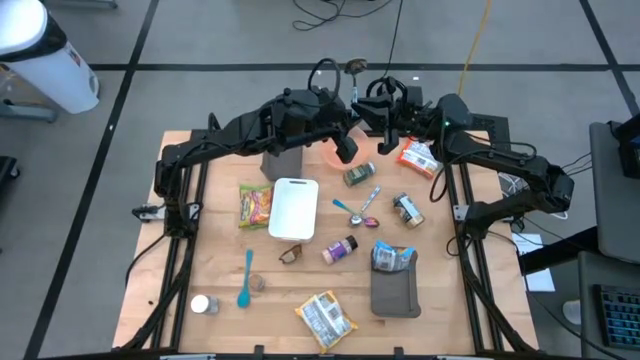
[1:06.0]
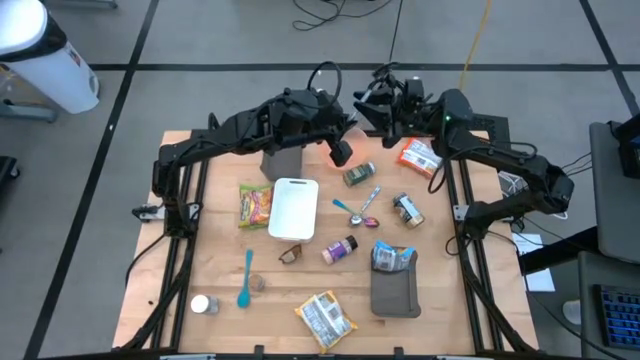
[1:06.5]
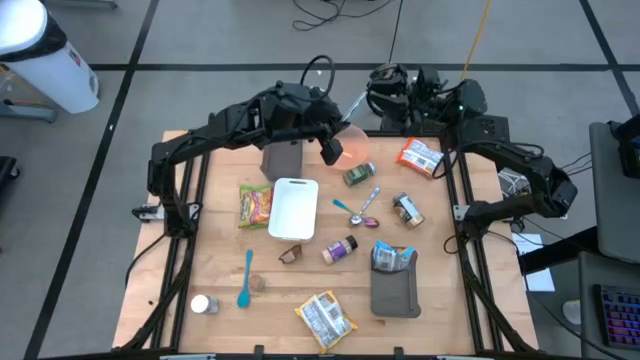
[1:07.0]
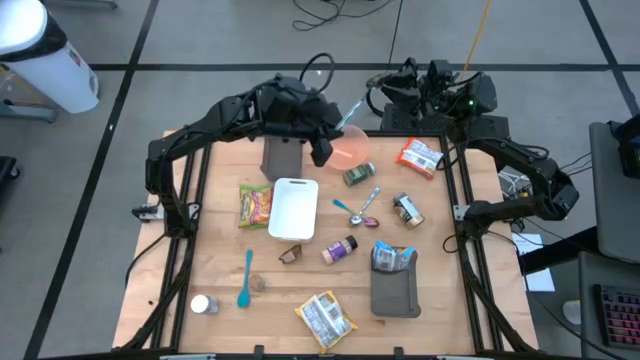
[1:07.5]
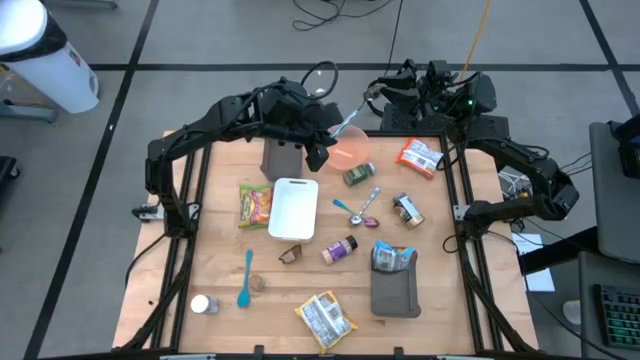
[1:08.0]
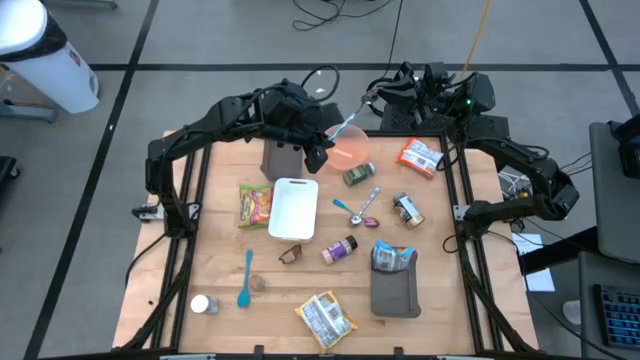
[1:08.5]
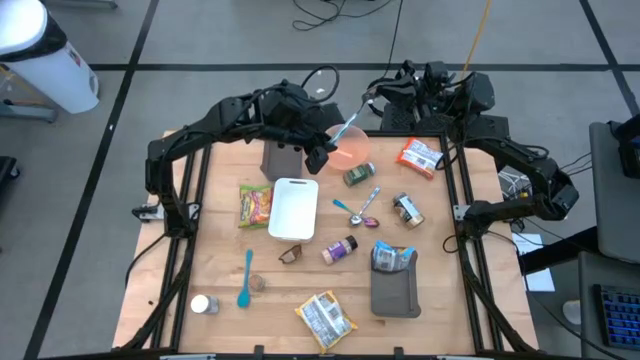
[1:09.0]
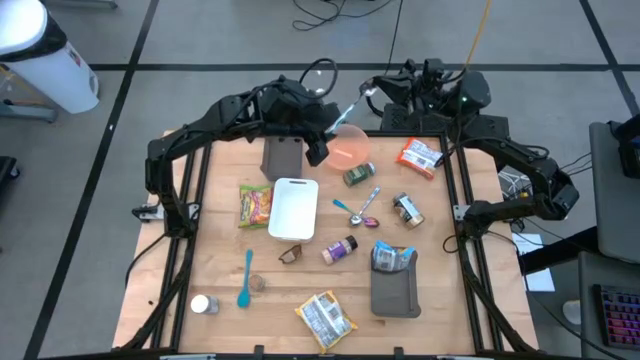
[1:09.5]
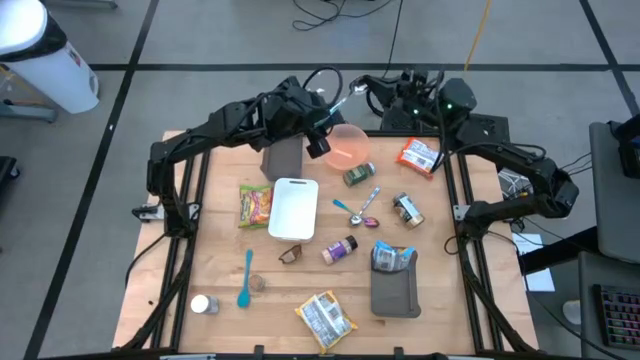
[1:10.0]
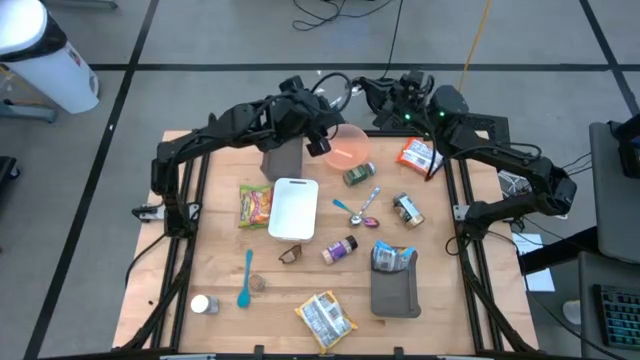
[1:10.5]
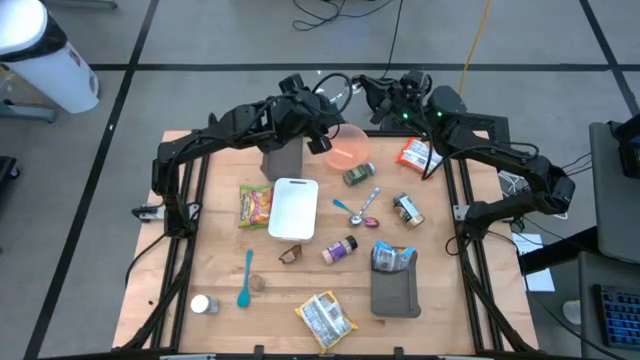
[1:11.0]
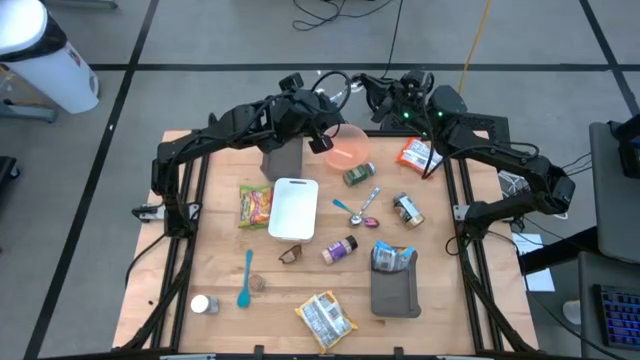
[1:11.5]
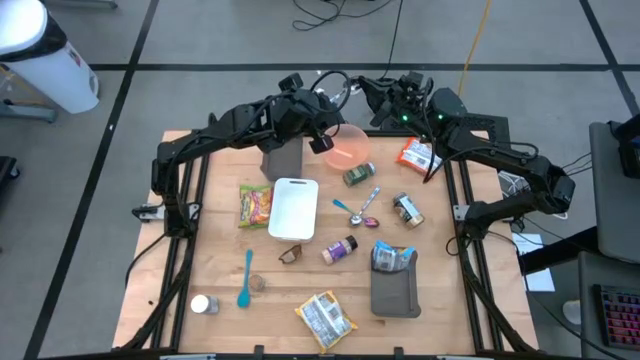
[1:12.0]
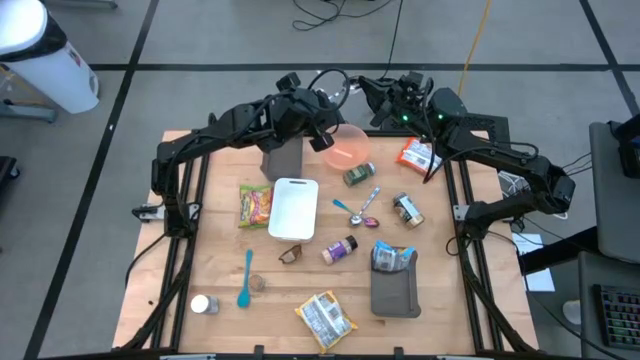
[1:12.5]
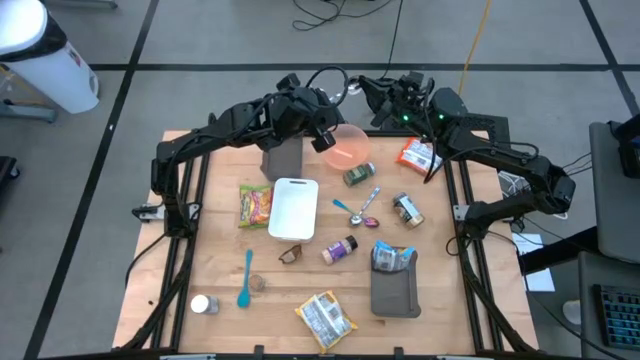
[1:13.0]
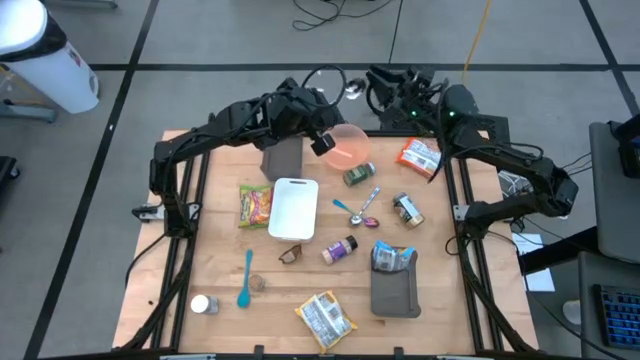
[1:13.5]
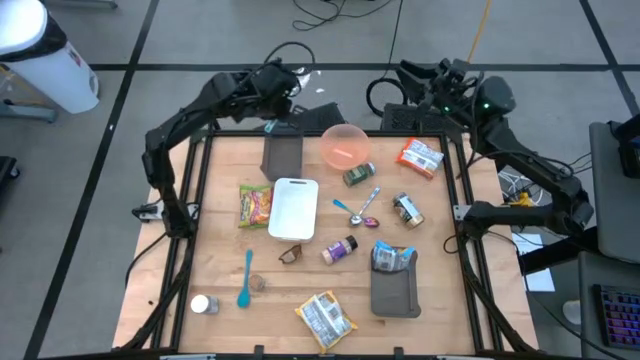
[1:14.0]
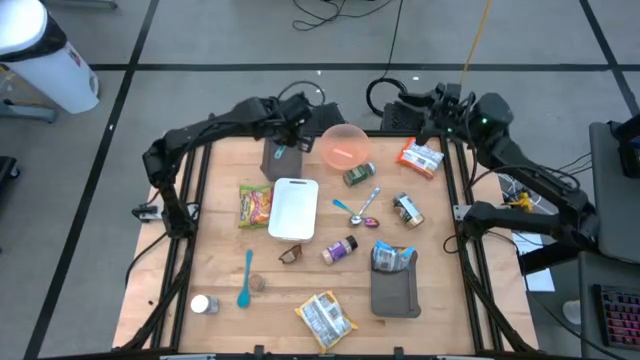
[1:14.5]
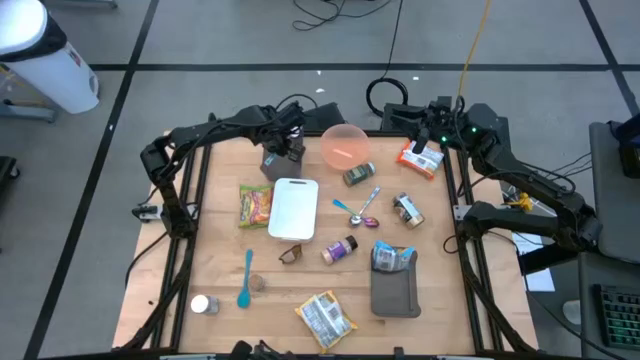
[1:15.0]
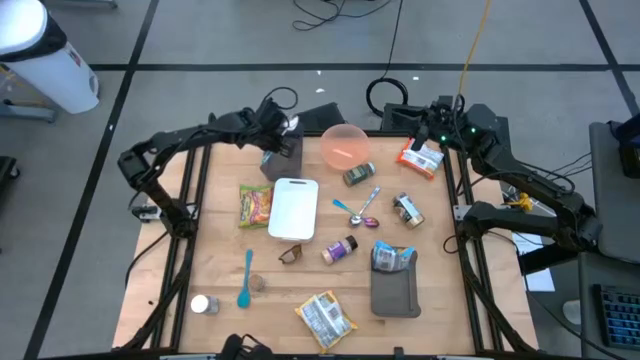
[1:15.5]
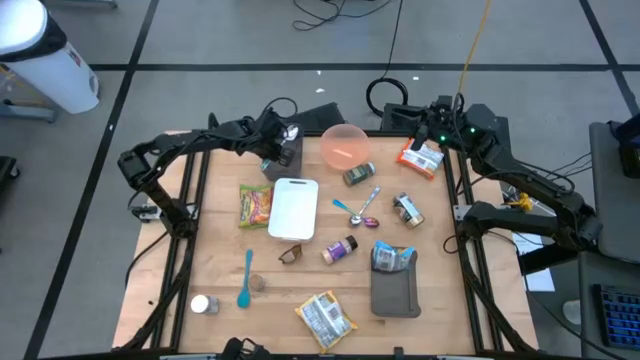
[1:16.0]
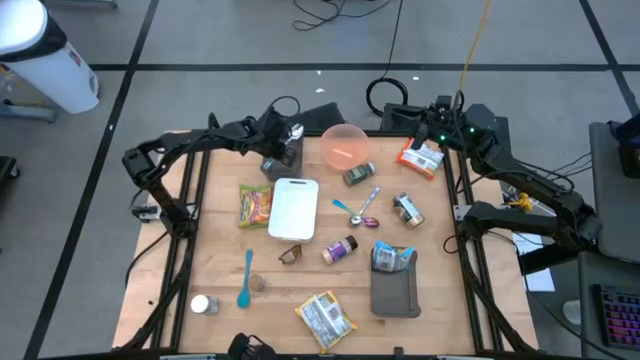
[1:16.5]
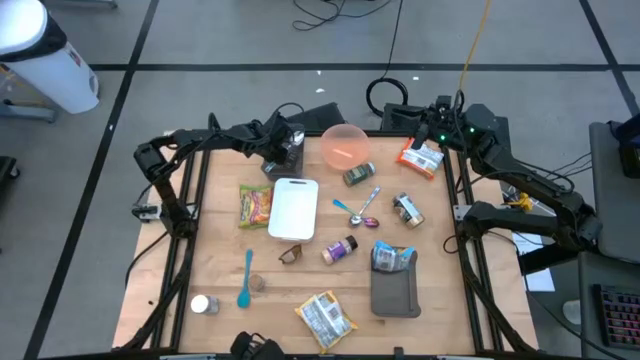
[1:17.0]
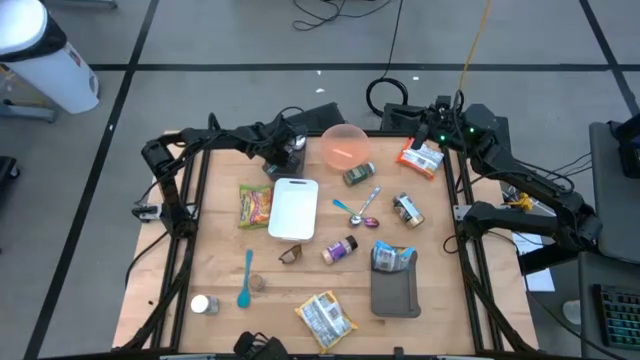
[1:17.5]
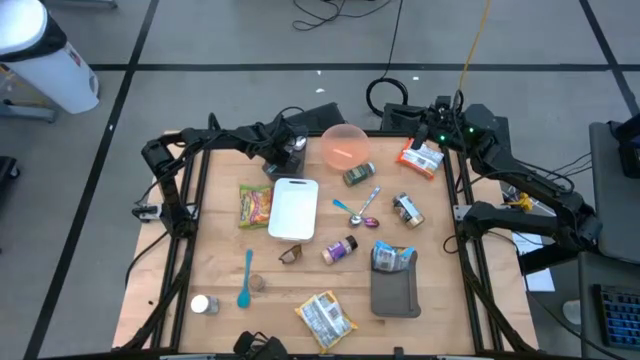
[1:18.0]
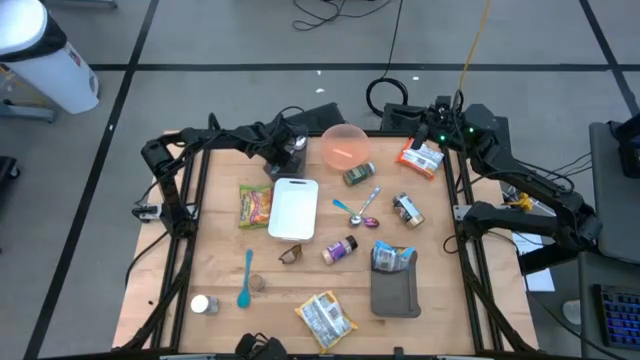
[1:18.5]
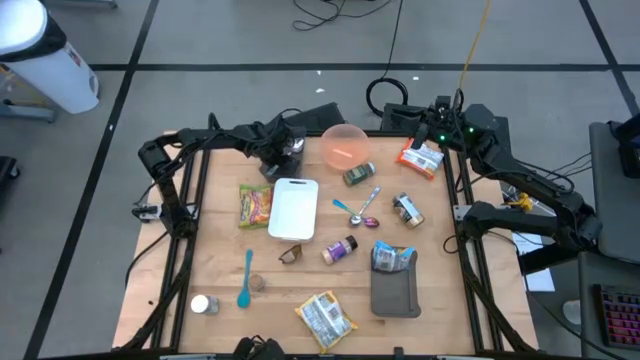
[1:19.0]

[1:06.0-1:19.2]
Task: Pick & Place Food Item
Put the left blue pattern spoon into the top black transparent bin

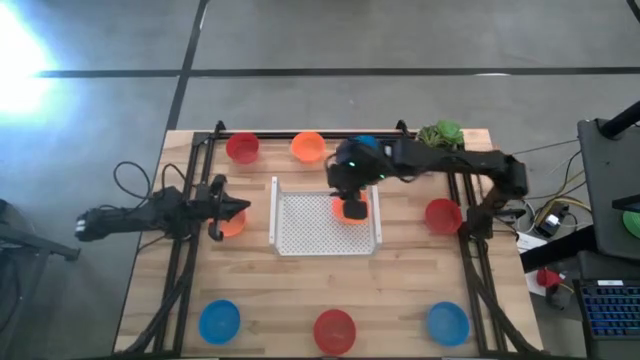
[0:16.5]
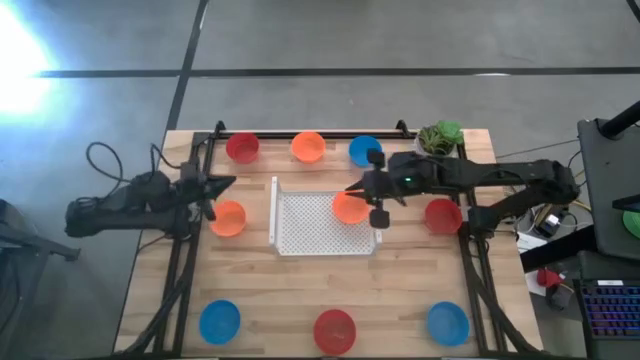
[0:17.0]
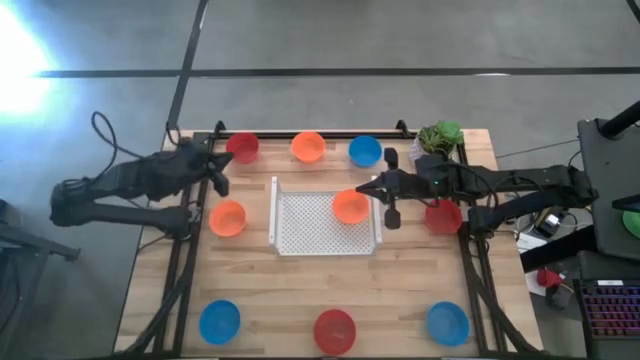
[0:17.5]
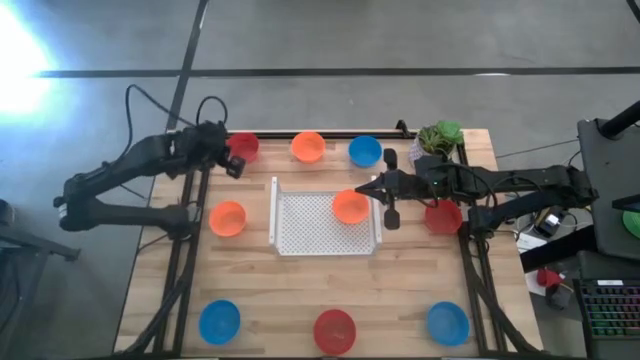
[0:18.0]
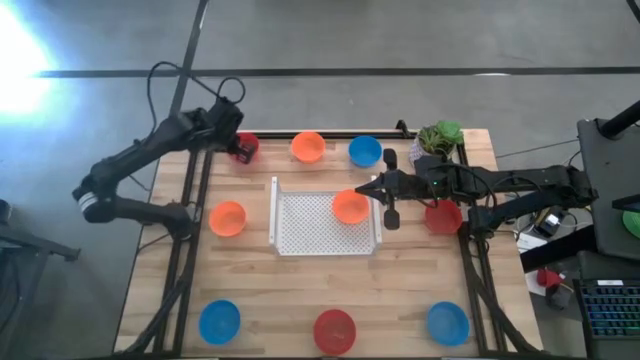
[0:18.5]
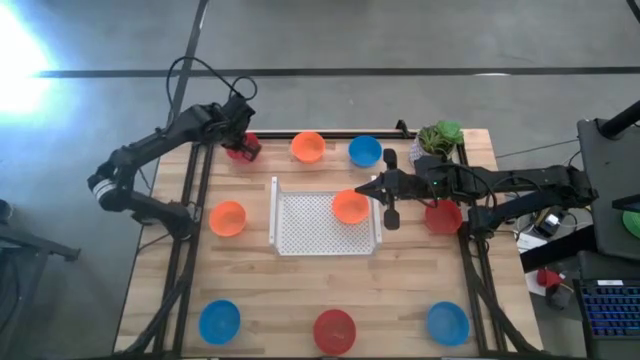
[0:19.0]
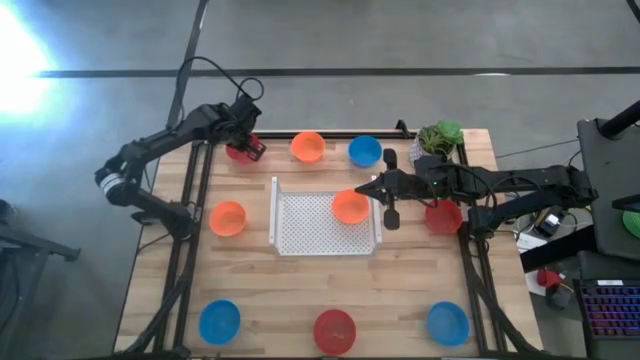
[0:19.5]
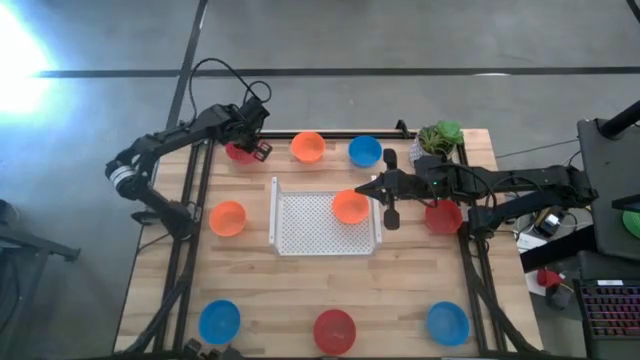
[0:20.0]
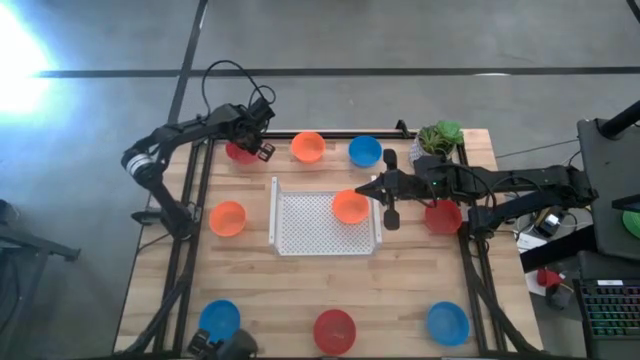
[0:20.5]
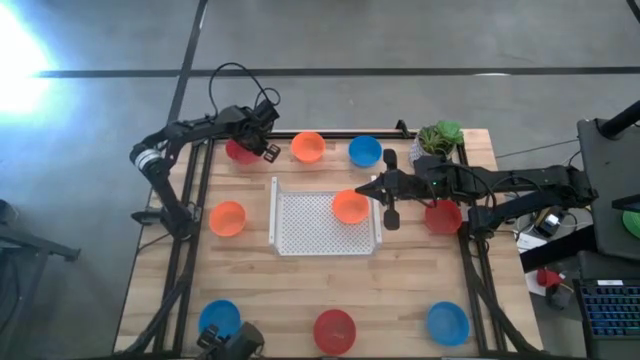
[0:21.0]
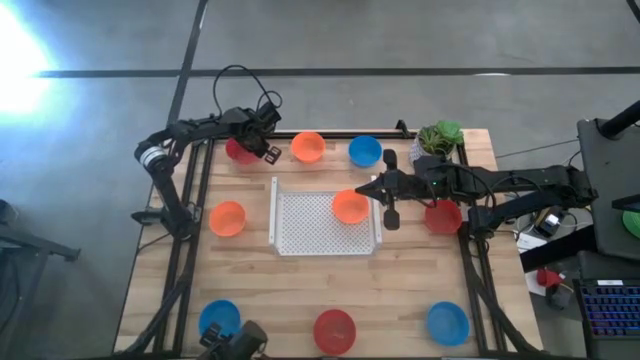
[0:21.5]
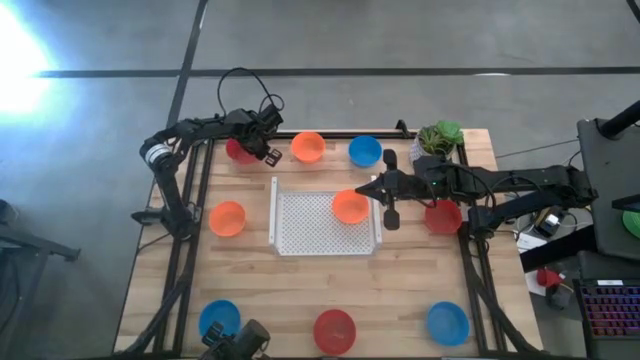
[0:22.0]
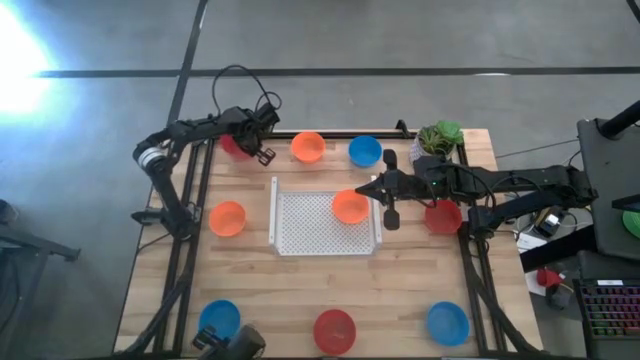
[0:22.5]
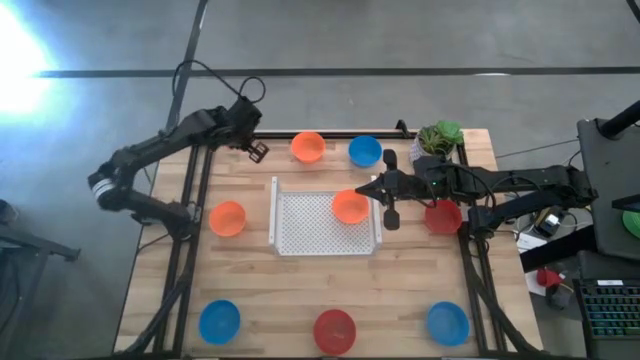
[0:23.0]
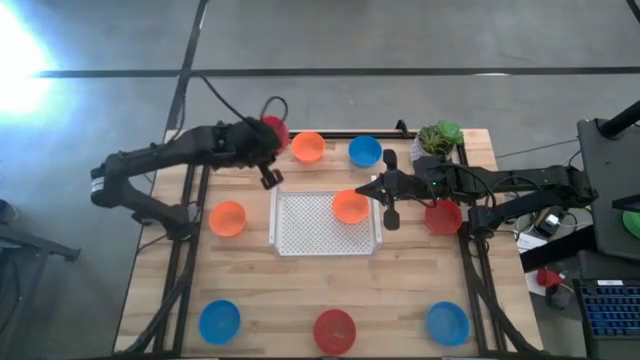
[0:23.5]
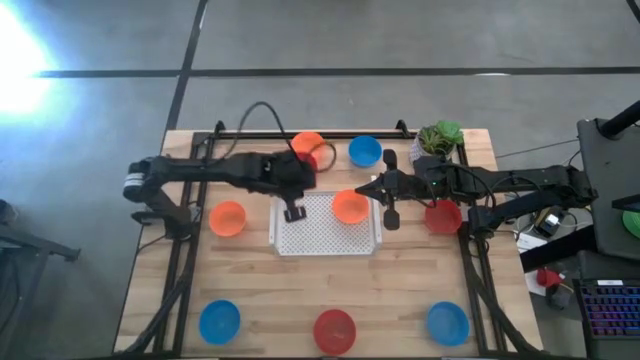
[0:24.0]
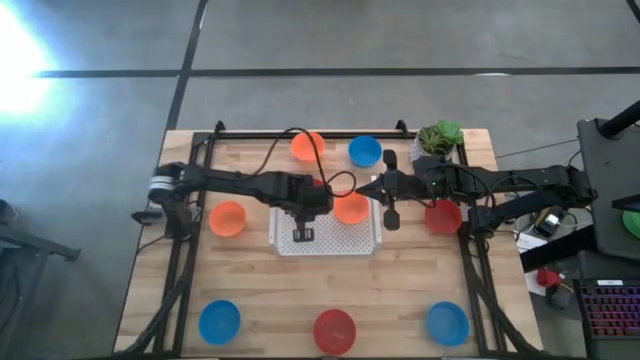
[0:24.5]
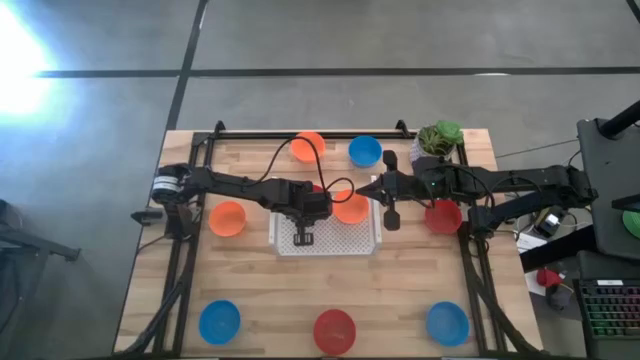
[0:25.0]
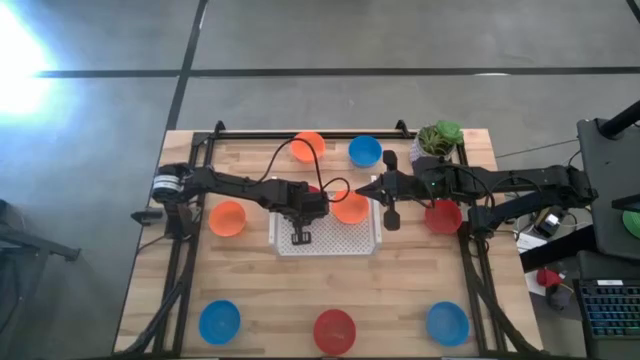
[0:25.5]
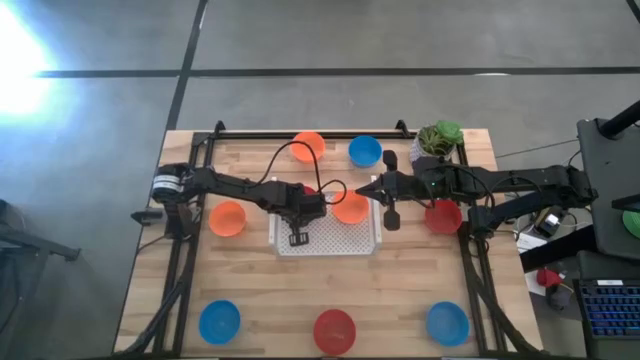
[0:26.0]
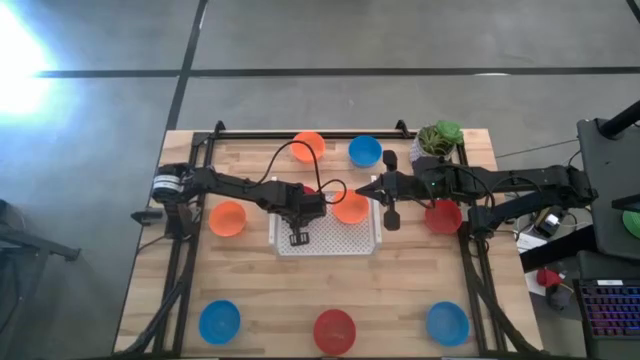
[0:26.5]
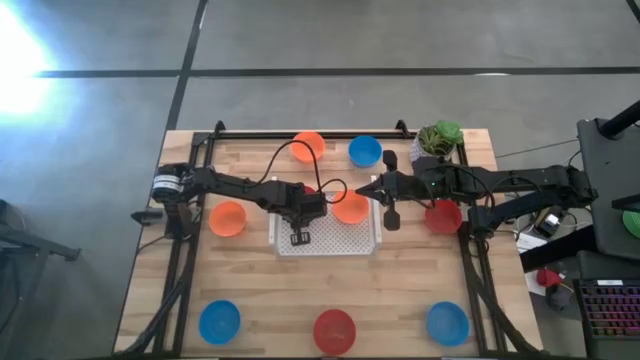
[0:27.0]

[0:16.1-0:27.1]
Task: Pick & Place Mini bowls
Put the top red bowl on the shelf
